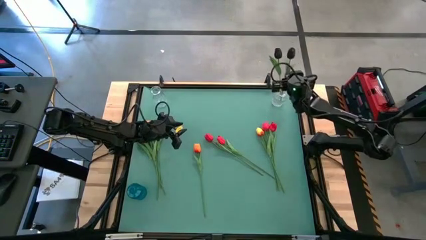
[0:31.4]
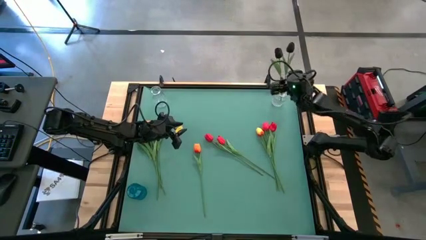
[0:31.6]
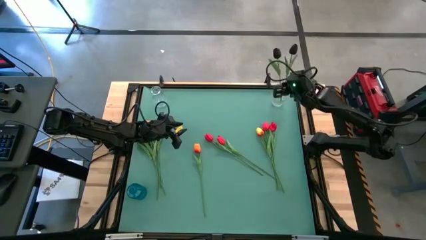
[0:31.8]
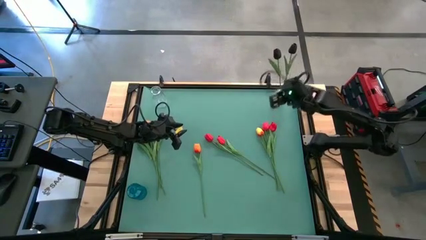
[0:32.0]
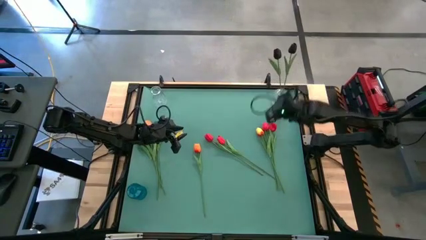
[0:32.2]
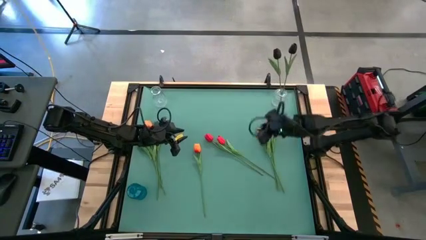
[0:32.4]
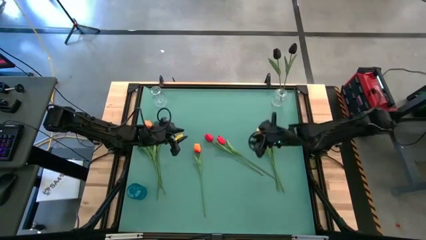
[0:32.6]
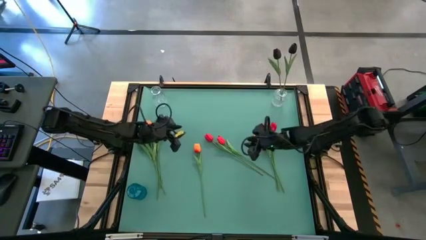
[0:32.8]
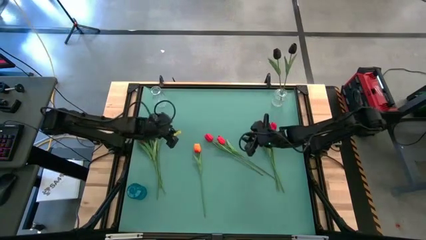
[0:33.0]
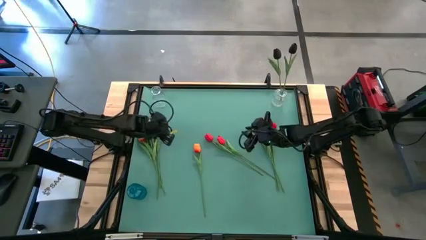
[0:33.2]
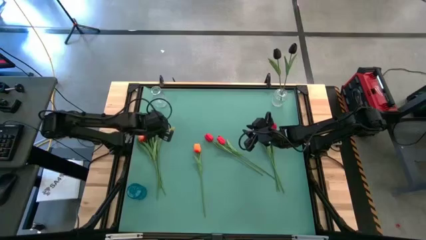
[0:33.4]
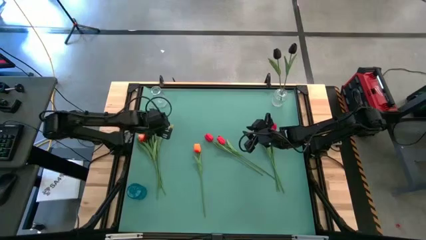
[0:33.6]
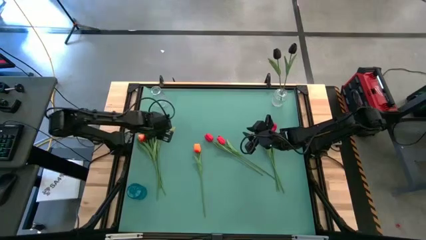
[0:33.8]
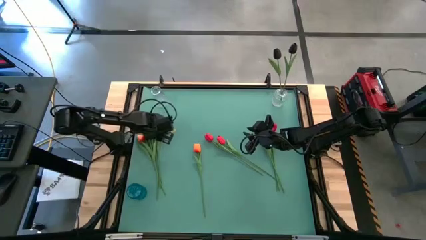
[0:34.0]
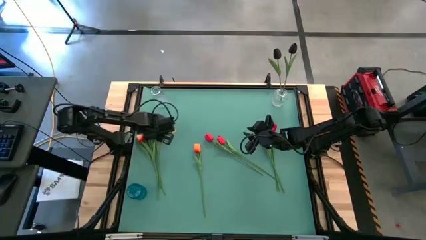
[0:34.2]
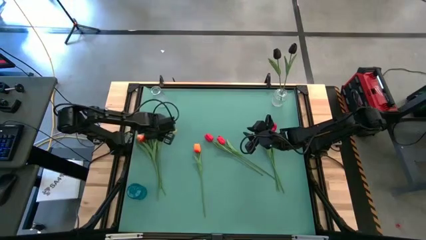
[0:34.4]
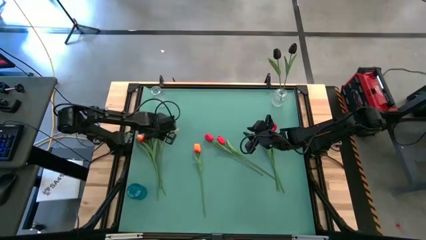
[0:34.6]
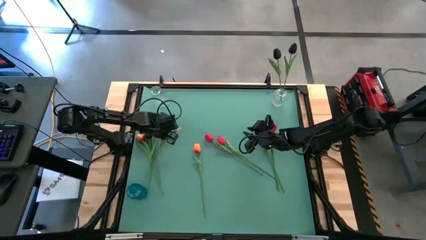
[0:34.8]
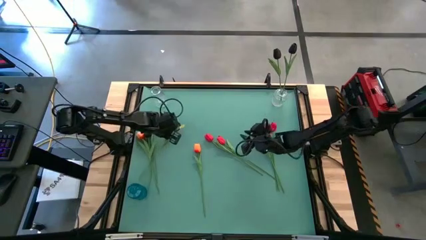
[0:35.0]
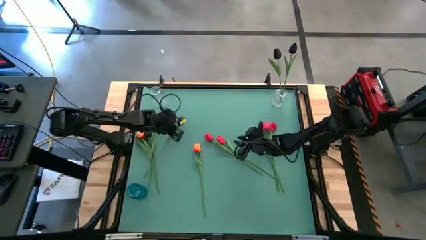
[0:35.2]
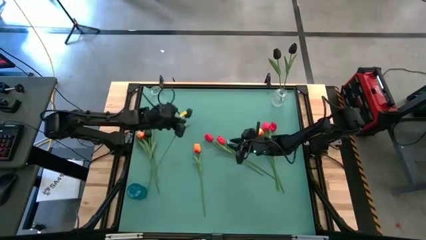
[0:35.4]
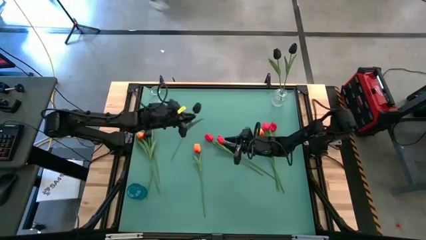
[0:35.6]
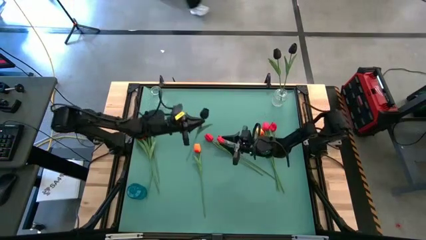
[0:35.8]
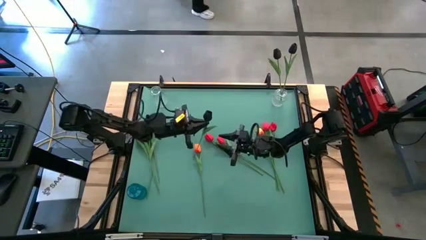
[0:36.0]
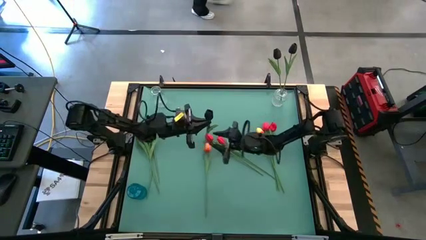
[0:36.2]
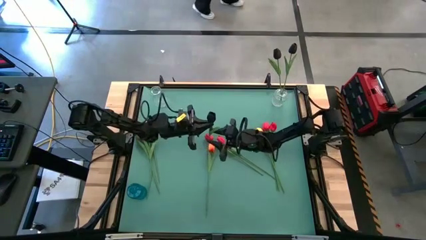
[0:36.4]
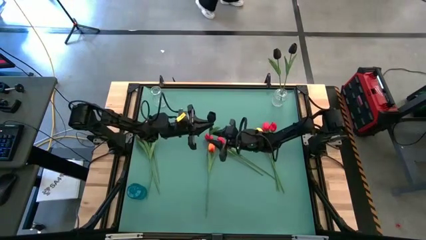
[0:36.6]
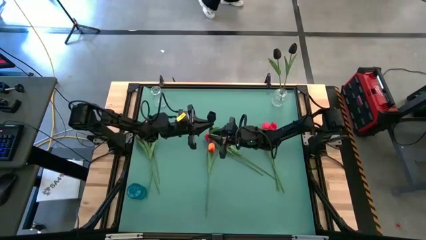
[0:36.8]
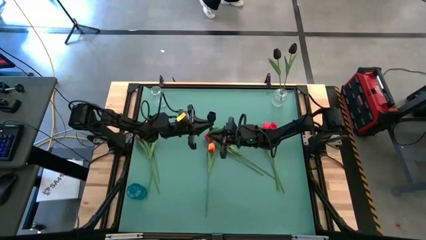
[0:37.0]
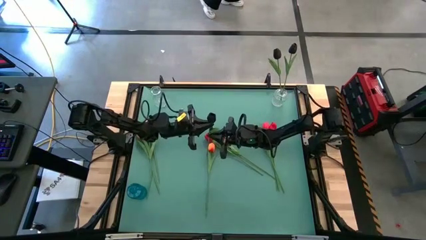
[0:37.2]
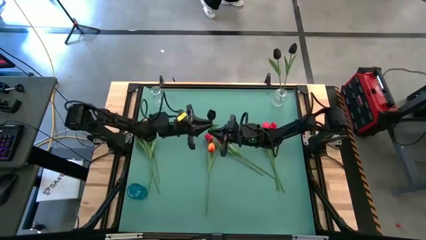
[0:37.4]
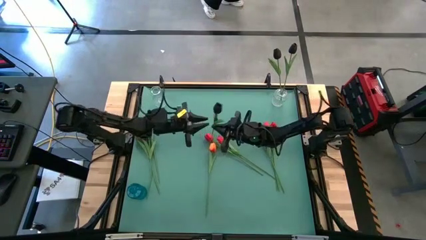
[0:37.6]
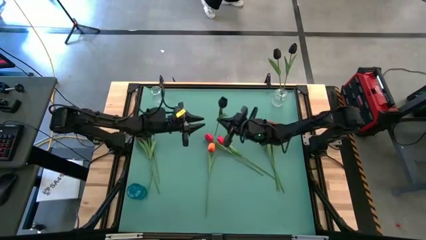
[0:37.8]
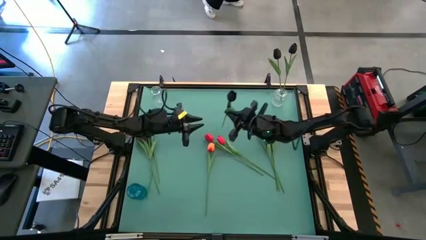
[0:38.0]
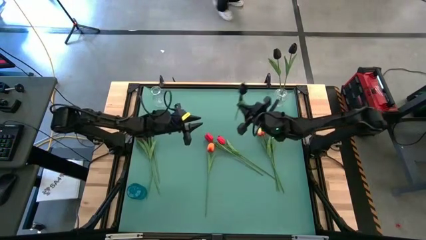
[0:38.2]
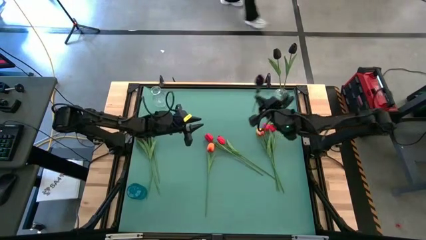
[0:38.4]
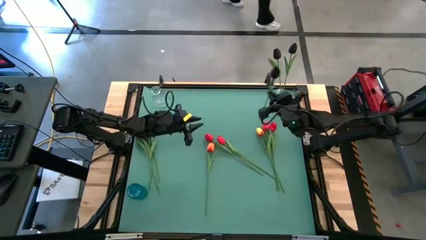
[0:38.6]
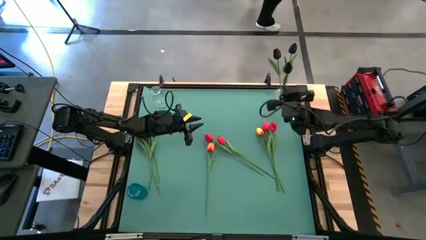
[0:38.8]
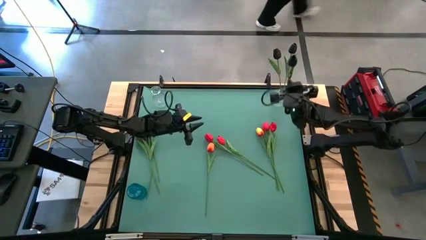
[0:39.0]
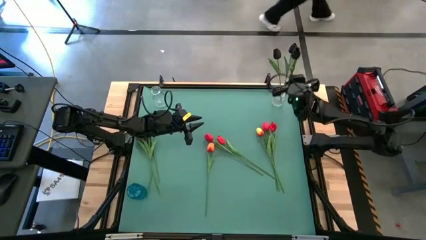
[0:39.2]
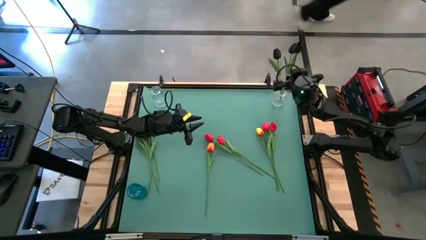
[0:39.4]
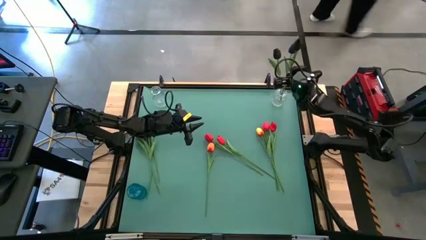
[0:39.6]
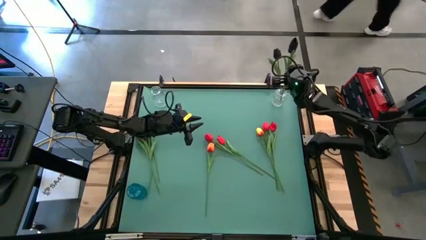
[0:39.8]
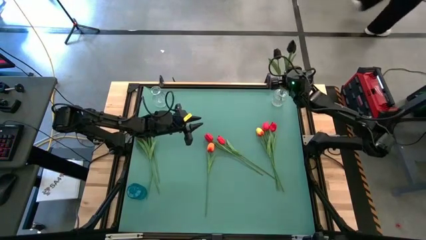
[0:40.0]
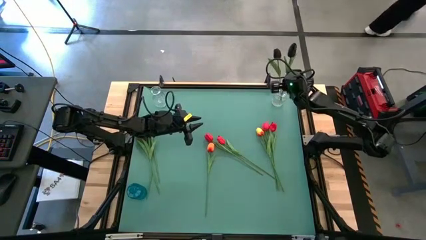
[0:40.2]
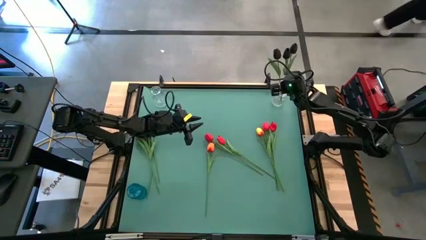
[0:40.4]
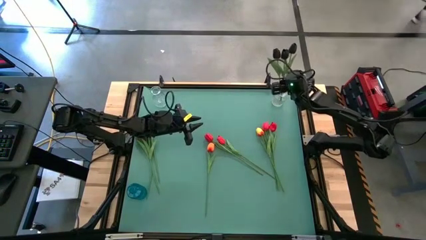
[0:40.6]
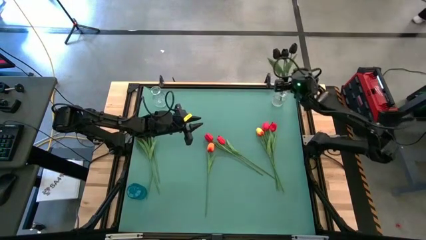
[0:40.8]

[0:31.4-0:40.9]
Task: Sort flowers into vase by color
Put the black tulip into the right transparent vase

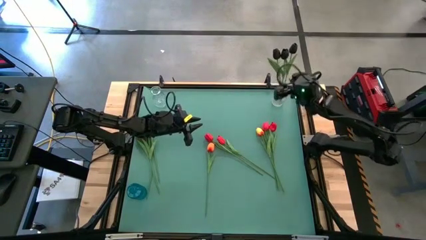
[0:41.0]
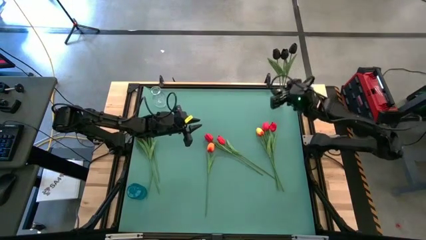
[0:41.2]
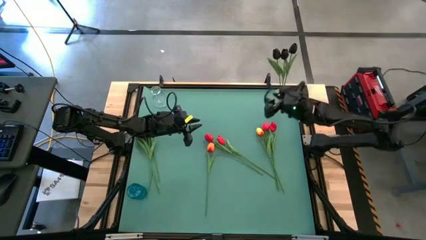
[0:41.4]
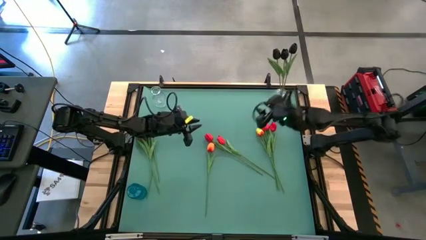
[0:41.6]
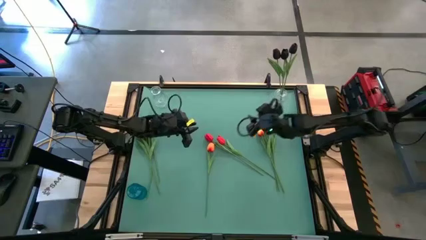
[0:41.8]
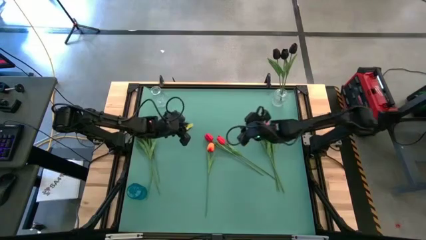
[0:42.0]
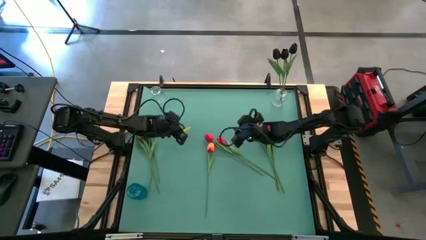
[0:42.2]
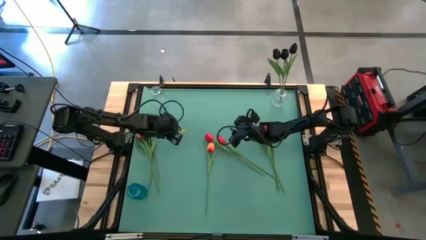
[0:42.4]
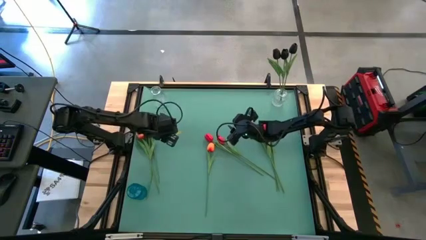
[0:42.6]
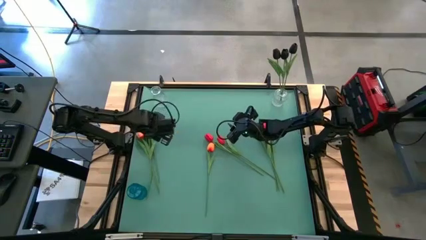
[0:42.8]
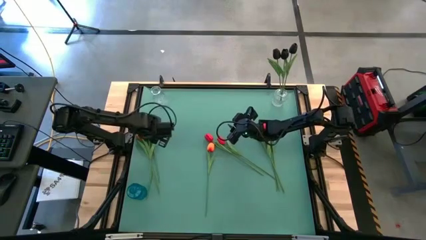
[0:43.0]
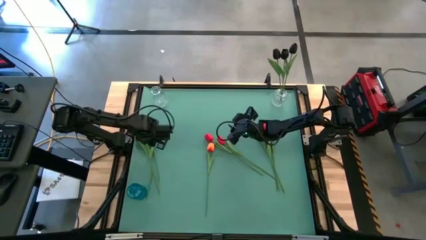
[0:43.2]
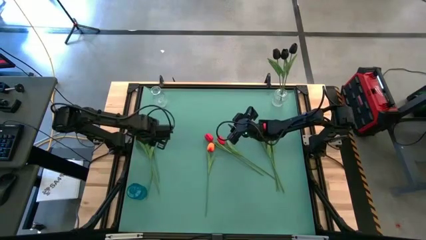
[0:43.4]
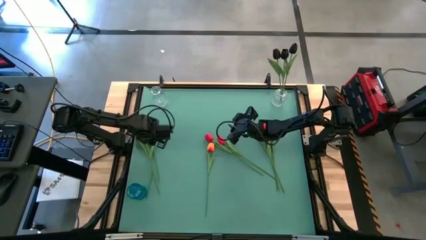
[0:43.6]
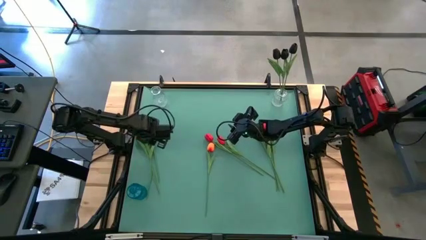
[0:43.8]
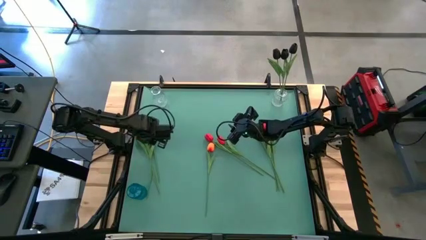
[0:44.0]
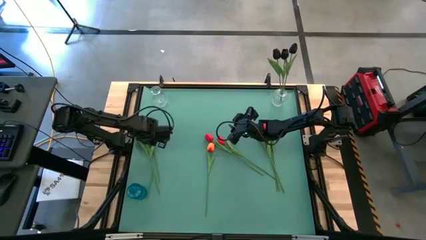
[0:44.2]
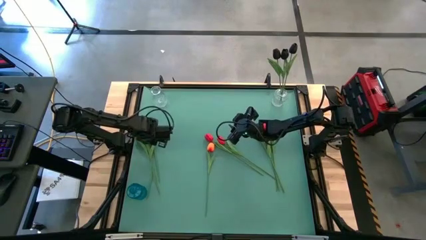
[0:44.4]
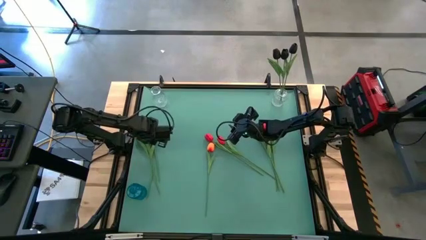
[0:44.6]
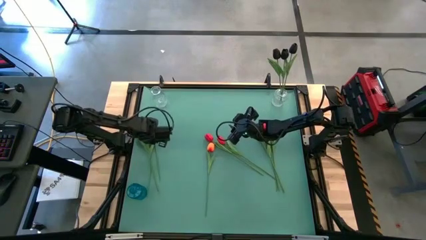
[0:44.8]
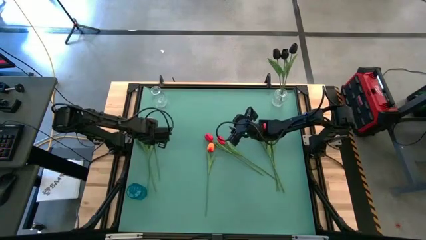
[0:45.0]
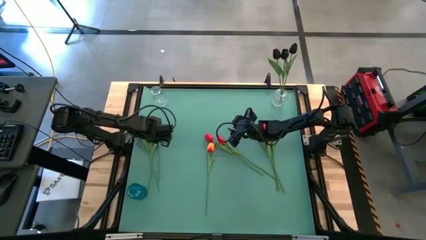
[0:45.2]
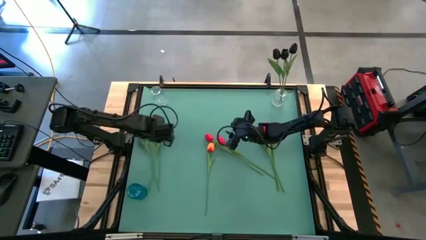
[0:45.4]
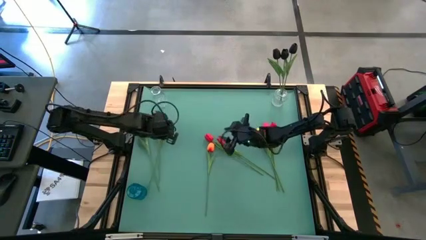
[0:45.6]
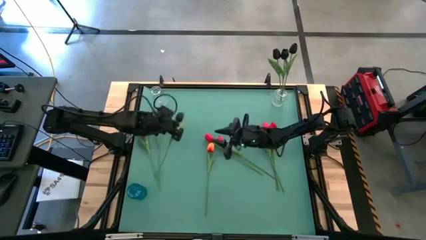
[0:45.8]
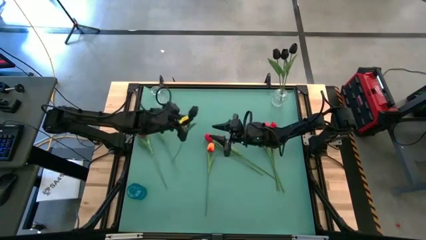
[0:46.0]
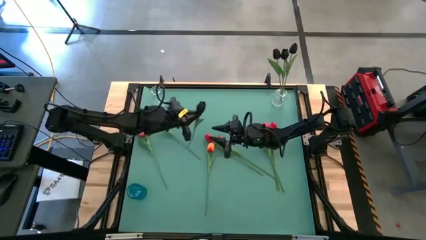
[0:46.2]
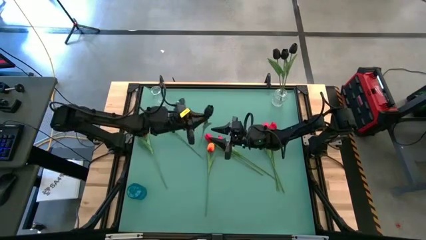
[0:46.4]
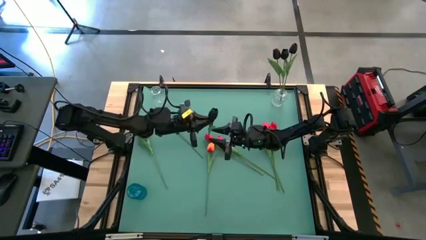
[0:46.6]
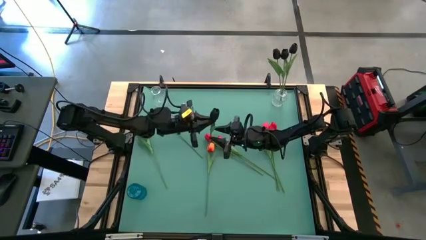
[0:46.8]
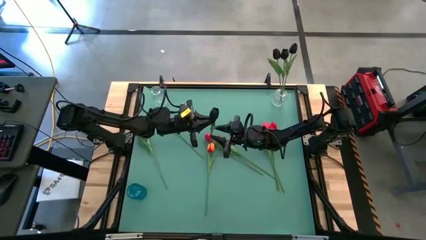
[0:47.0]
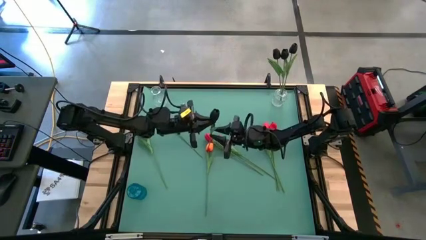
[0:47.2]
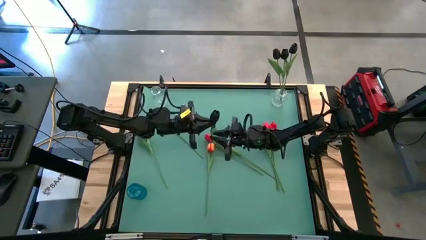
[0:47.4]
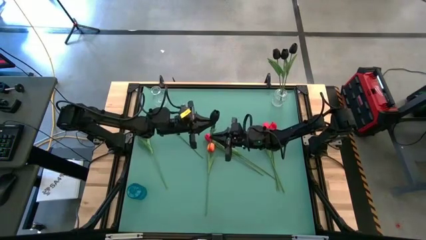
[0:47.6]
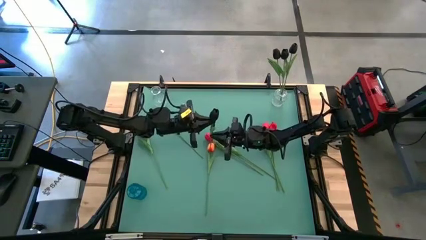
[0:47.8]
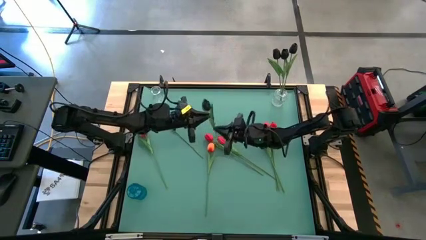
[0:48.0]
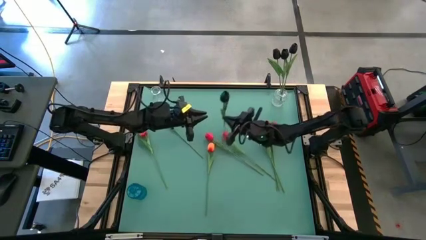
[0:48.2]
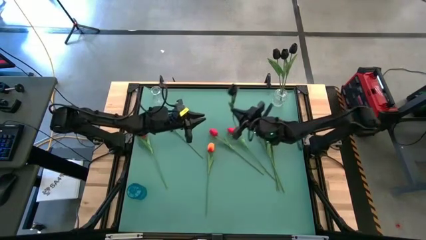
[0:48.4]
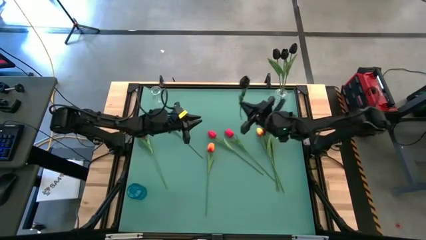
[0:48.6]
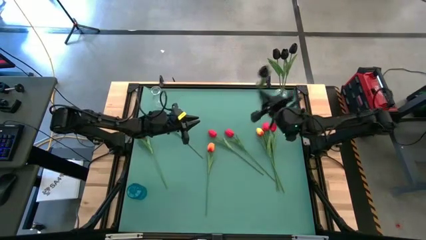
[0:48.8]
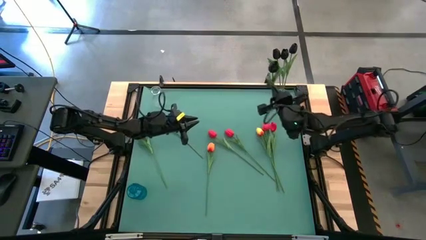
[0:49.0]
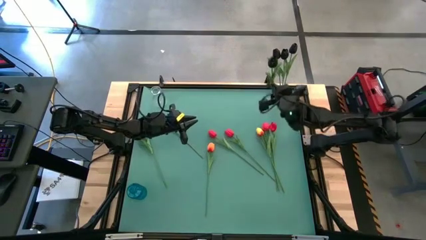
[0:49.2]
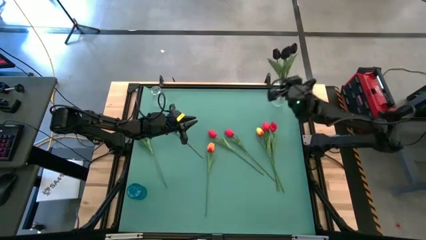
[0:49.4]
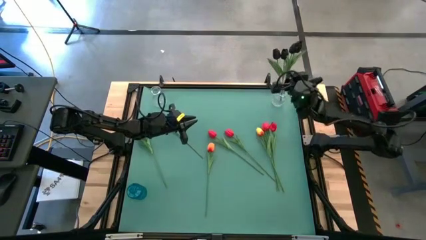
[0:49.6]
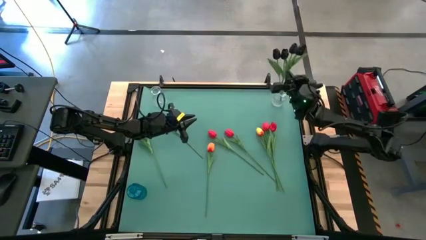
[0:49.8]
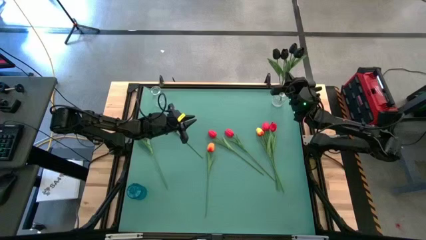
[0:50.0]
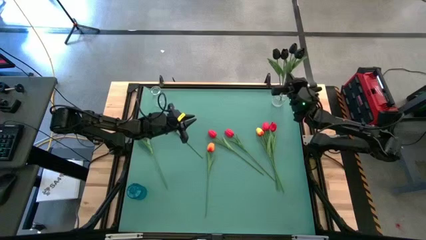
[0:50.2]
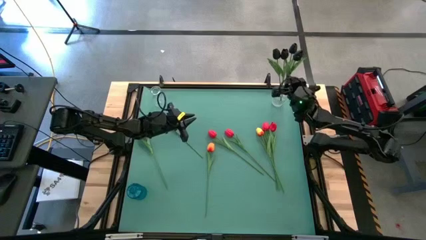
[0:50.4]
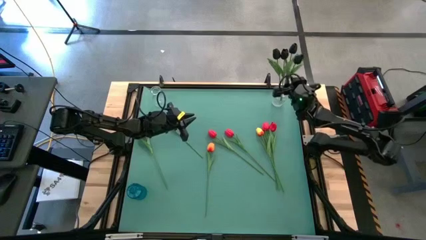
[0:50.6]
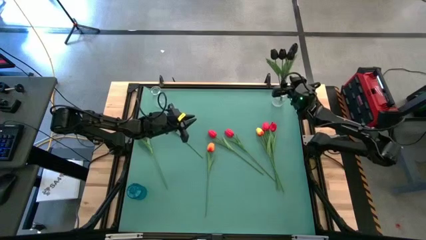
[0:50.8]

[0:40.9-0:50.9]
Put the black tulip into the right transparent vase
